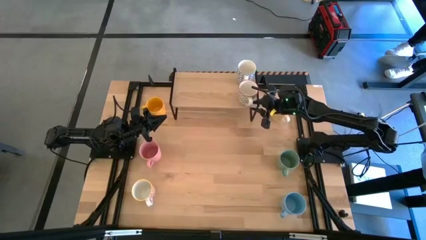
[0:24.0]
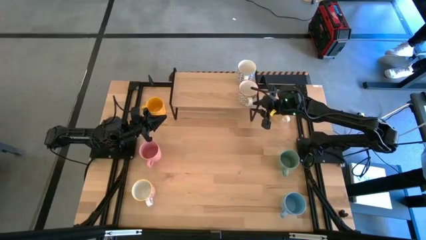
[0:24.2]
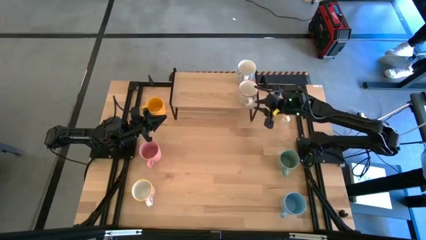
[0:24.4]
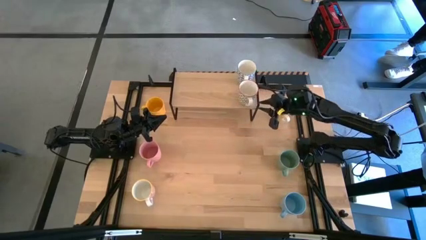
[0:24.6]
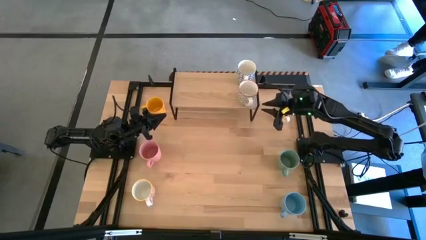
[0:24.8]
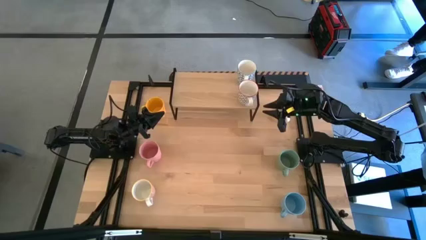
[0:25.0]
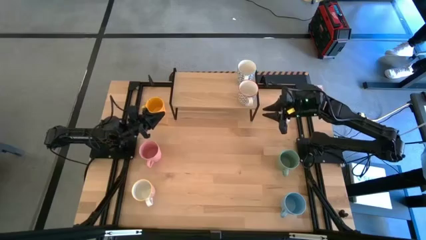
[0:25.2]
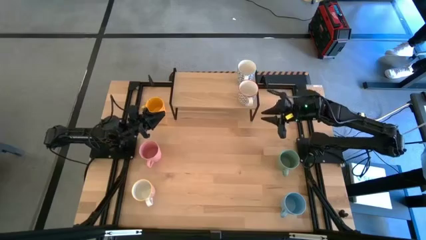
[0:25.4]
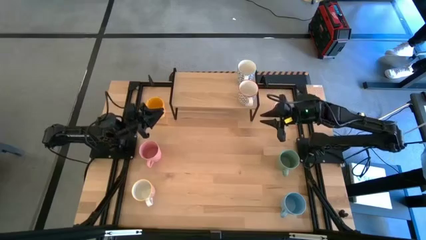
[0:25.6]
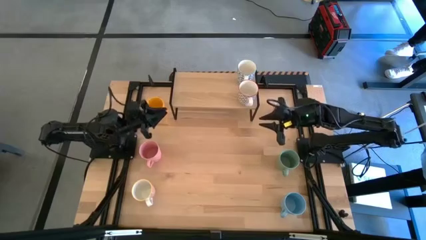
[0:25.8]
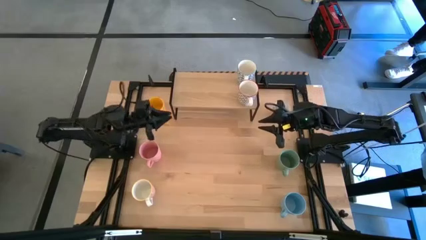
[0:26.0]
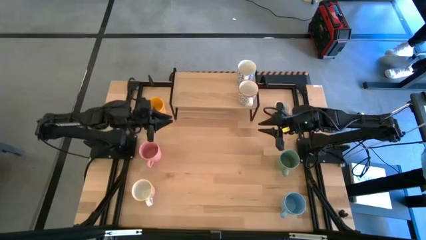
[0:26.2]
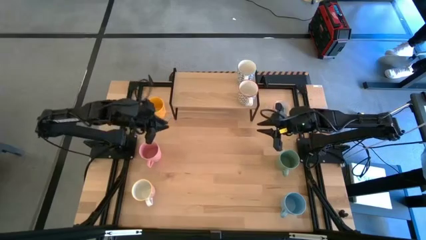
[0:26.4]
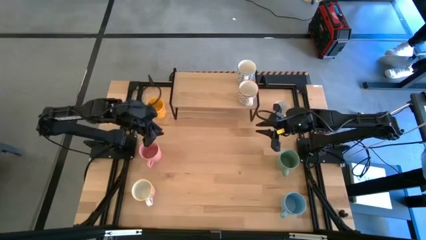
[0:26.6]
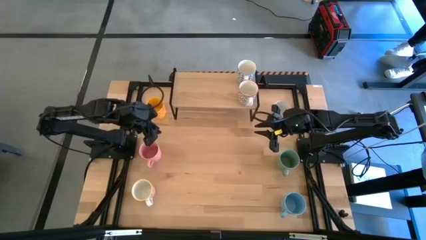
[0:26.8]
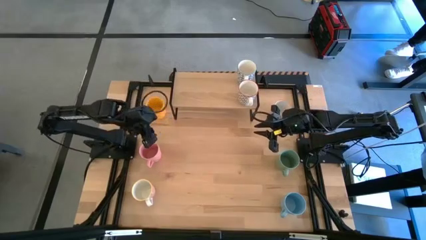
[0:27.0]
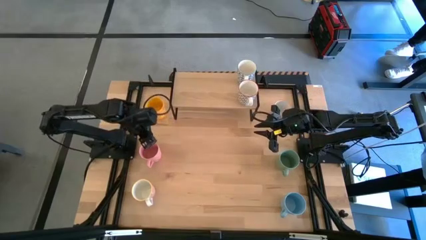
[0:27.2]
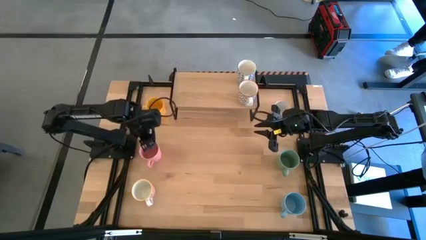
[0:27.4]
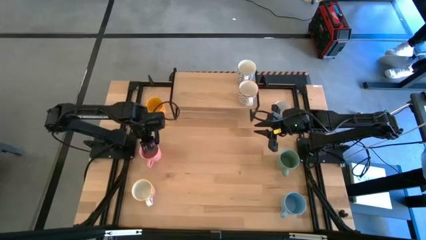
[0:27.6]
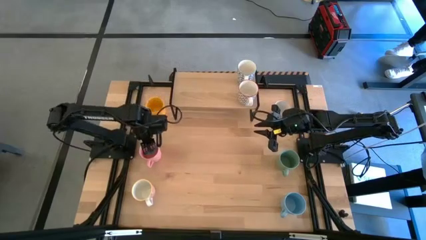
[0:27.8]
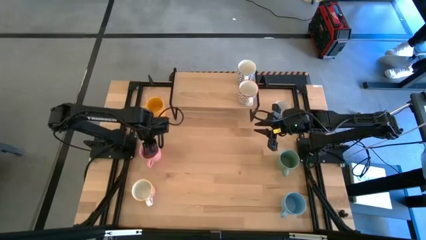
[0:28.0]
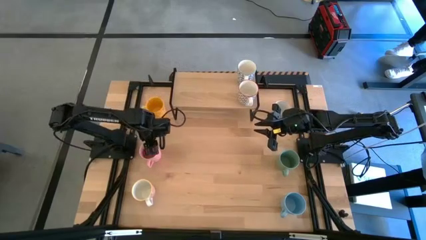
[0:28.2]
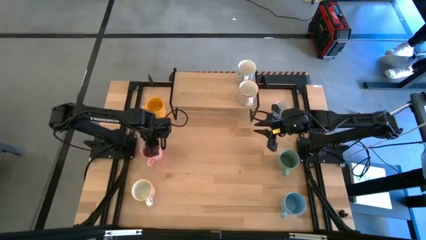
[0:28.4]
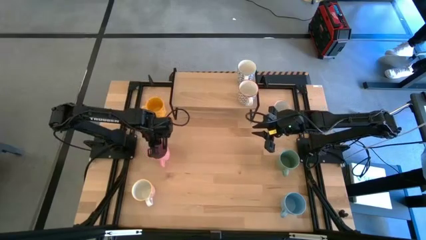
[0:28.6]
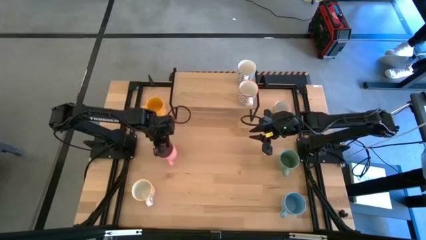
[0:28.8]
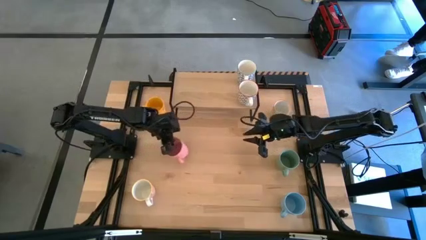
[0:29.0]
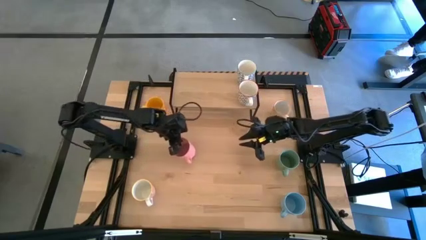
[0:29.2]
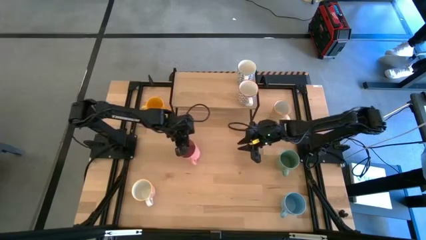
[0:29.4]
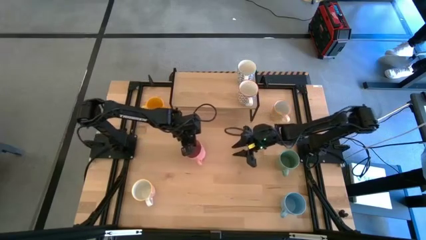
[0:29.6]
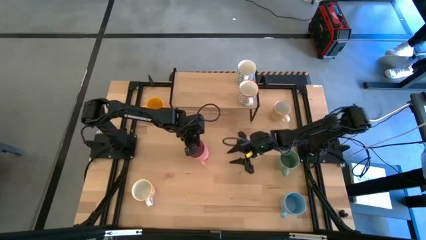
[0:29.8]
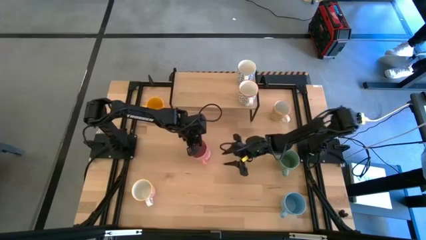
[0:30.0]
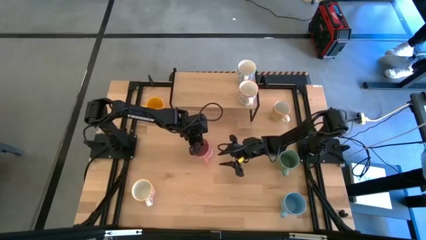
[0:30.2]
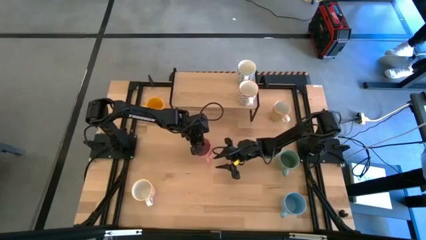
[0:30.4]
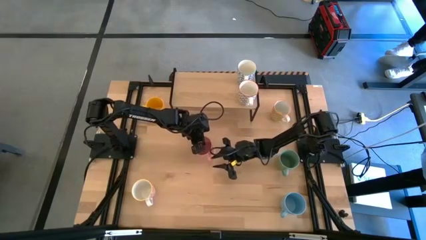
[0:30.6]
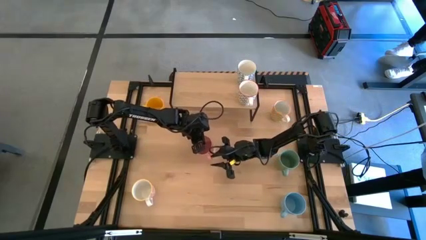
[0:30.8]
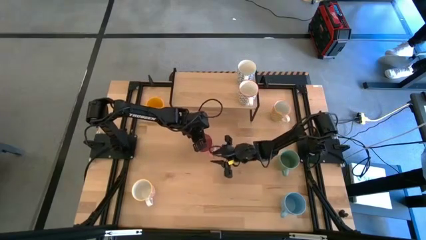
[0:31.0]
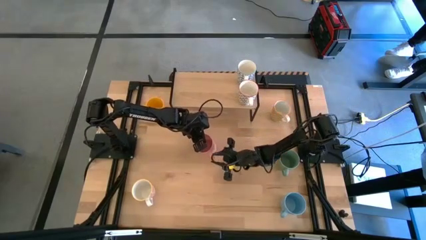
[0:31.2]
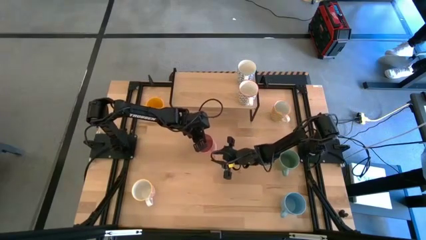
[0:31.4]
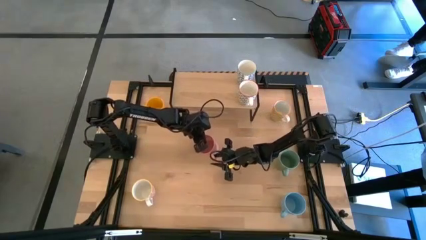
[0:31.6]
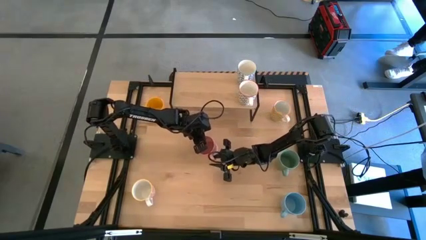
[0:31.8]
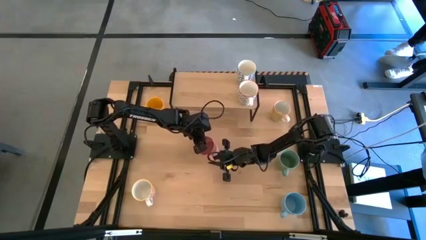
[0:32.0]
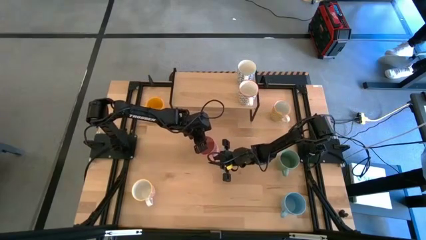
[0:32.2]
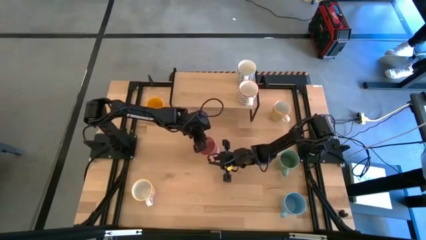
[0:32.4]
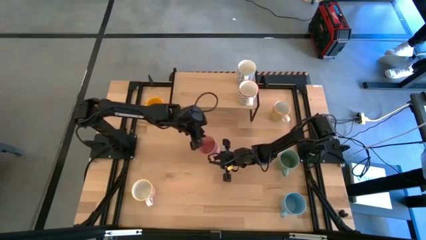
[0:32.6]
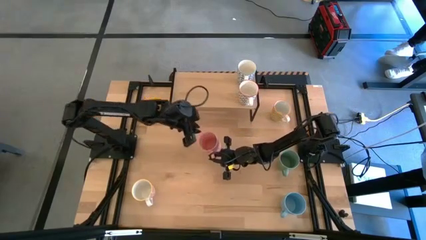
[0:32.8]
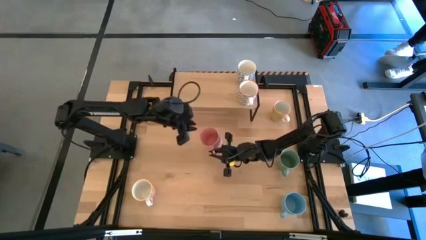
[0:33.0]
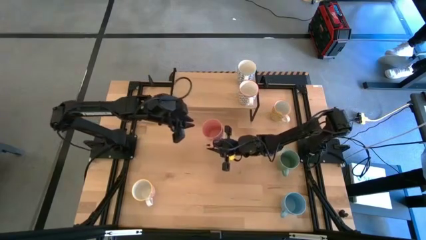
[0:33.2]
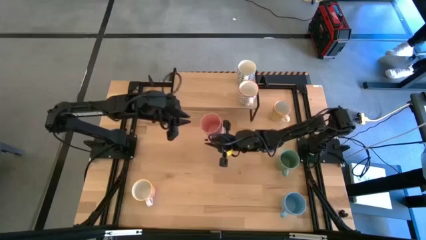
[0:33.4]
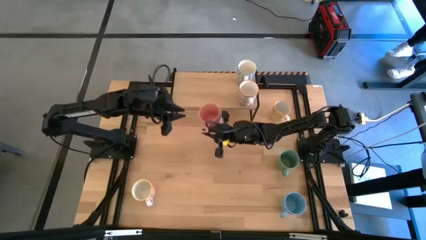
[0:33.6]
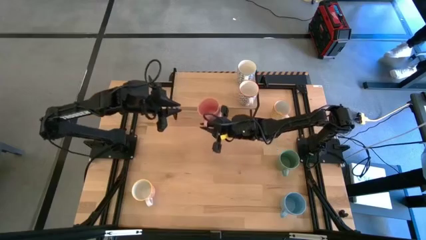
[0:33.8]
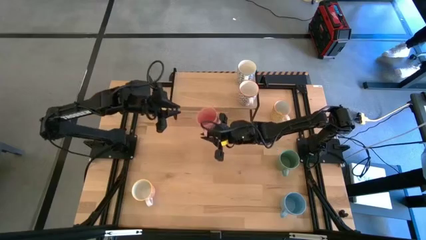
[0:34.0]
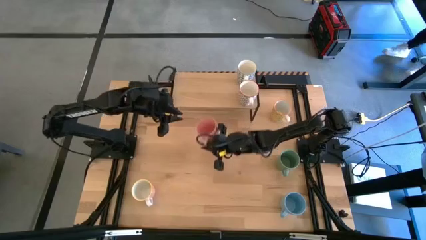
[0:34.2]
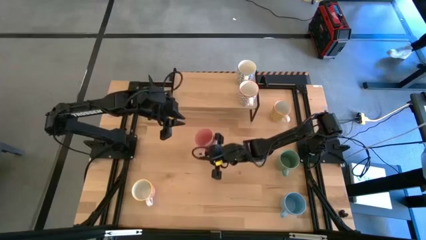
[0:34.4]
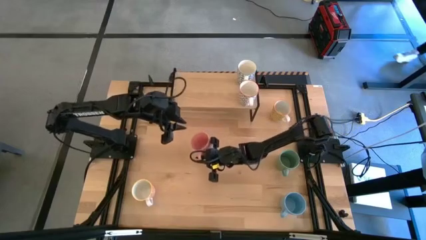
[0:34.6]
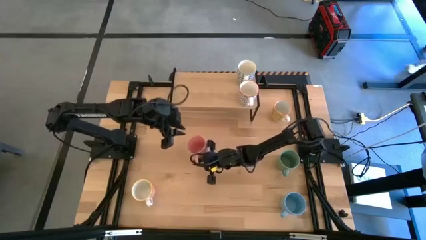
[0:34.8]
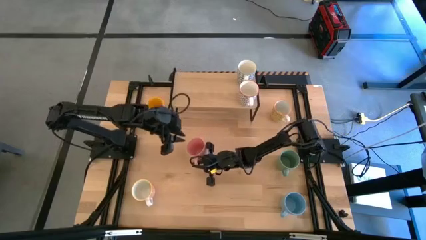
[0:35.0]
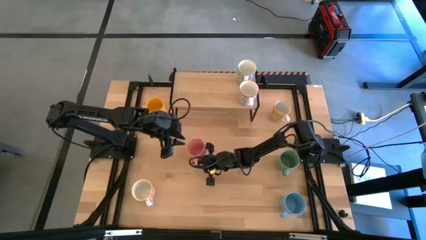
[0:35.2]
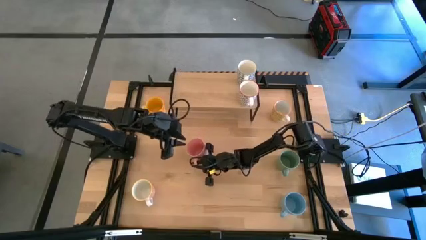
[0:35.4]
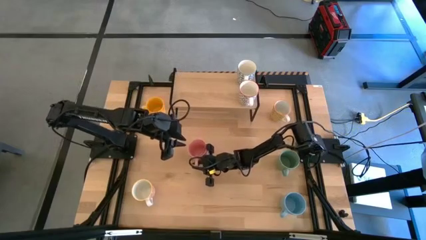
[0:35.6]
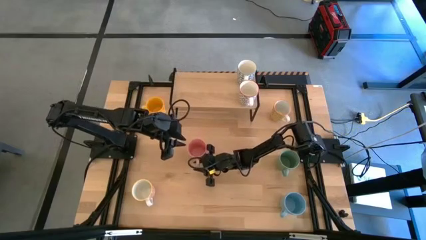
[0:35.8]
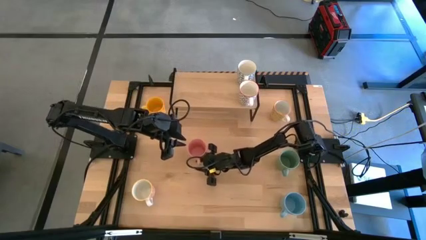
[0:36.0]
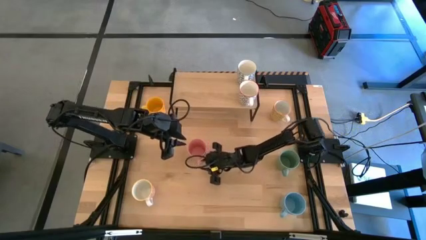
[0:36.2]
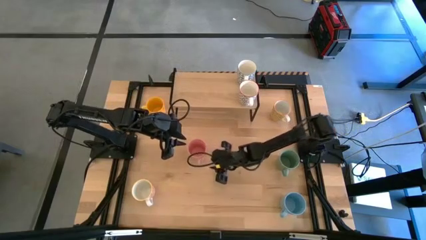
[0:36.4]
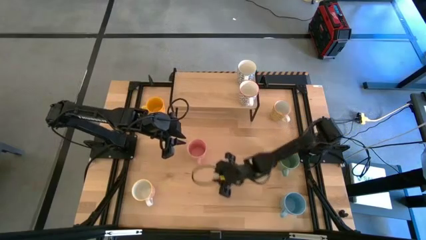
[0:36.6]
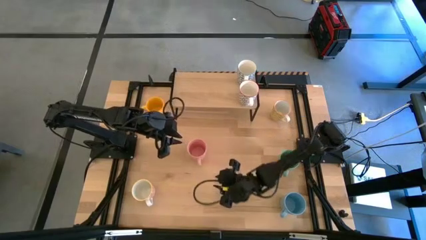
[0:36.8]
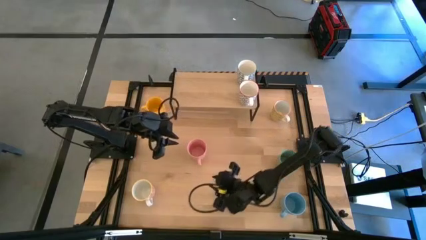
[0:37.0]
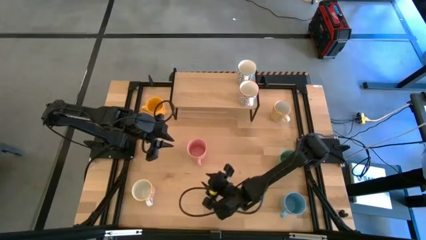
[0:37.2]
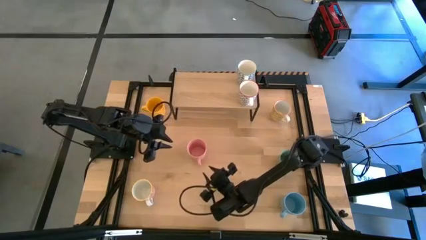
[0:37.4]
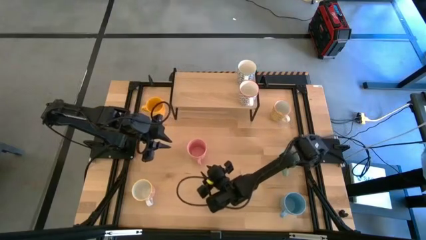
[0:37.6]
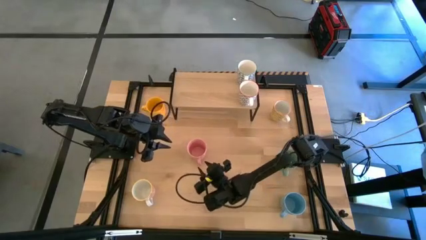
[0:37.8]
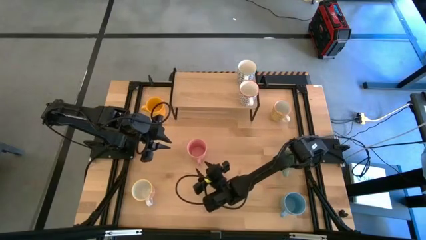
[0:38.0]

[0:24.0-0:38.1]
Task: Place coffee mugs
Put the pink mug on the shelf
